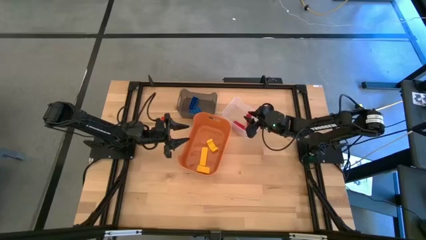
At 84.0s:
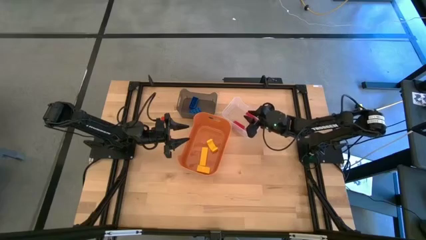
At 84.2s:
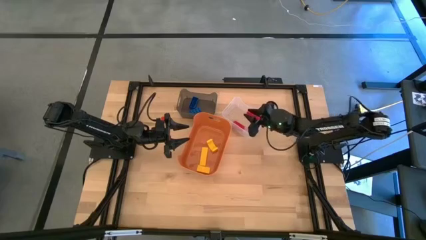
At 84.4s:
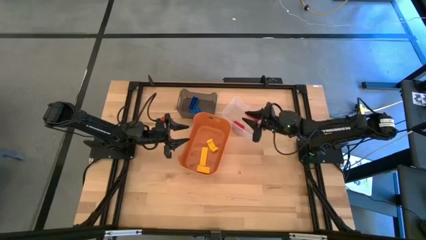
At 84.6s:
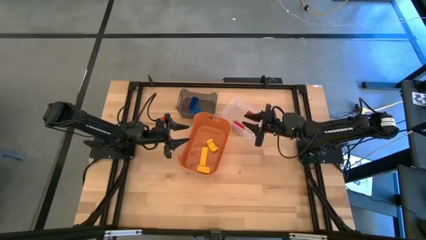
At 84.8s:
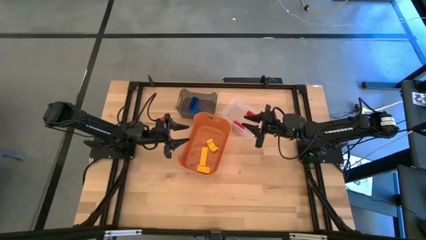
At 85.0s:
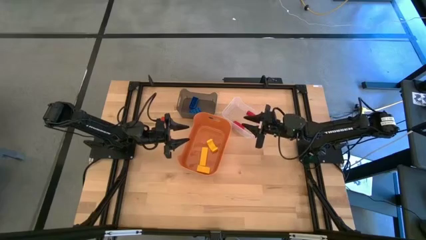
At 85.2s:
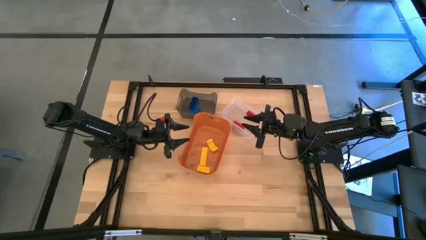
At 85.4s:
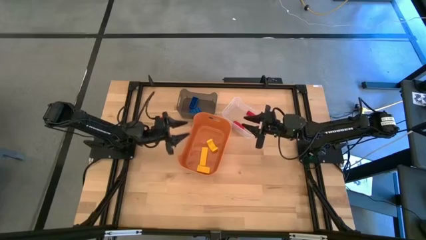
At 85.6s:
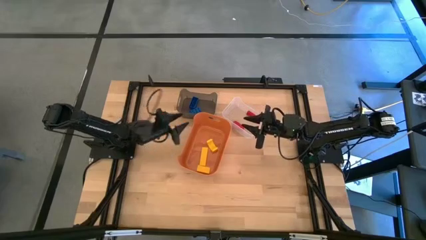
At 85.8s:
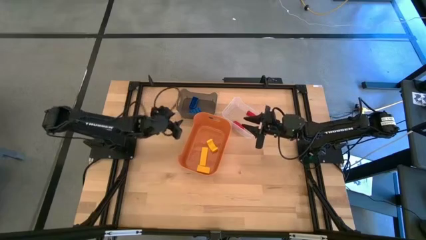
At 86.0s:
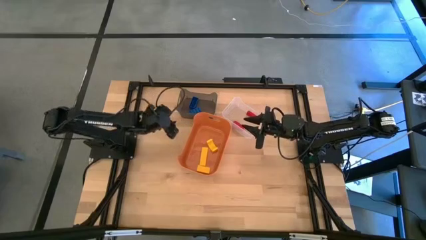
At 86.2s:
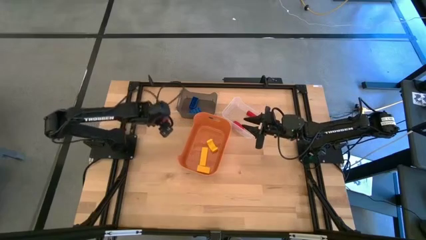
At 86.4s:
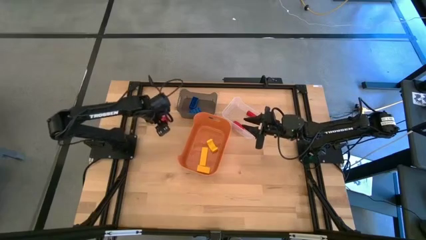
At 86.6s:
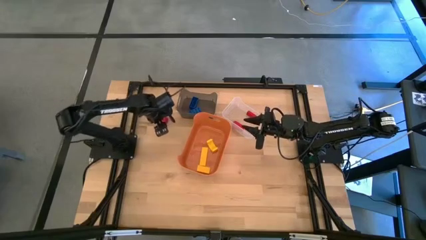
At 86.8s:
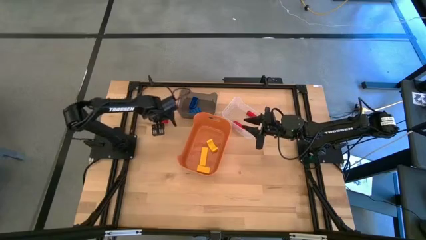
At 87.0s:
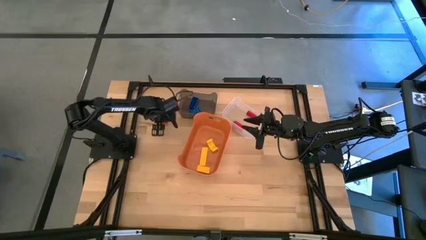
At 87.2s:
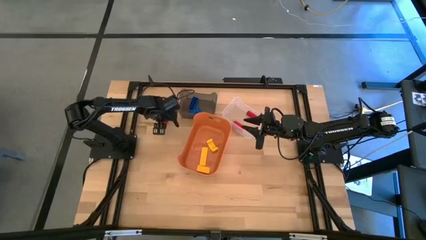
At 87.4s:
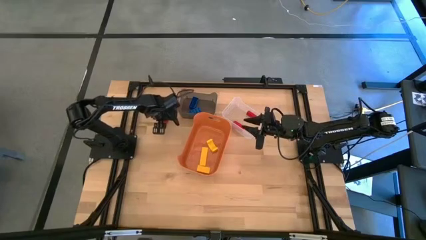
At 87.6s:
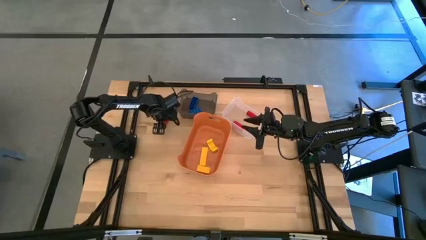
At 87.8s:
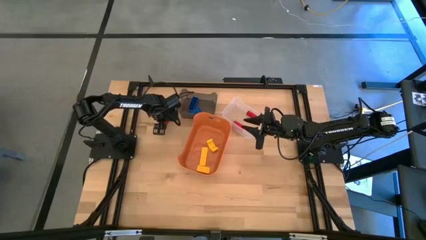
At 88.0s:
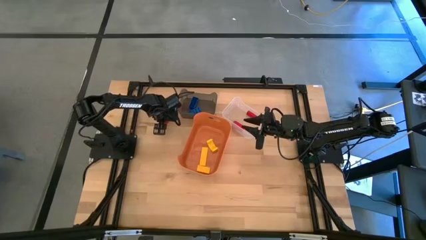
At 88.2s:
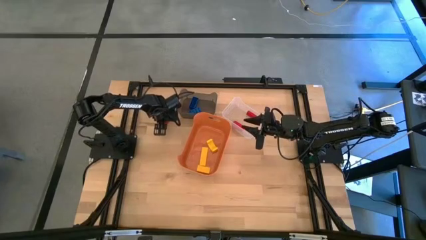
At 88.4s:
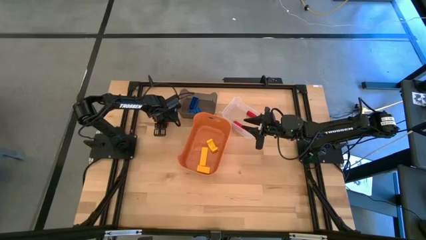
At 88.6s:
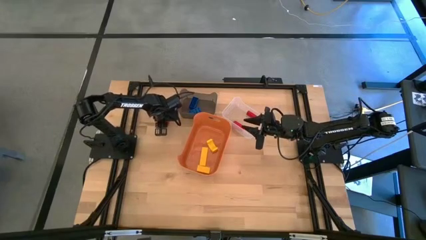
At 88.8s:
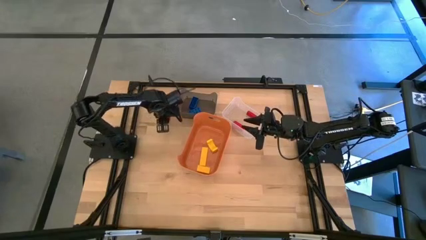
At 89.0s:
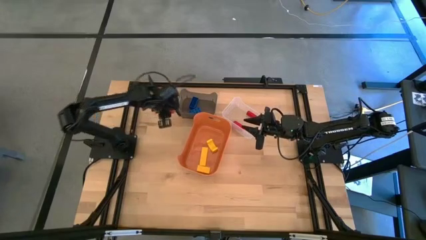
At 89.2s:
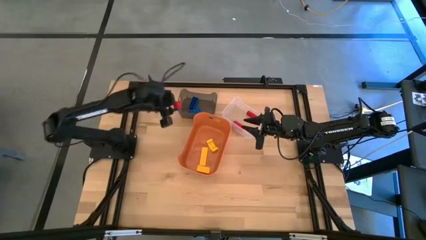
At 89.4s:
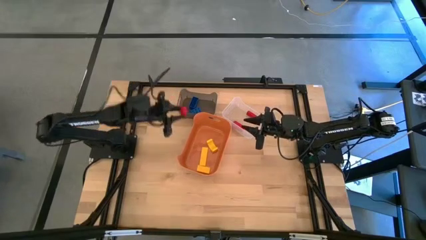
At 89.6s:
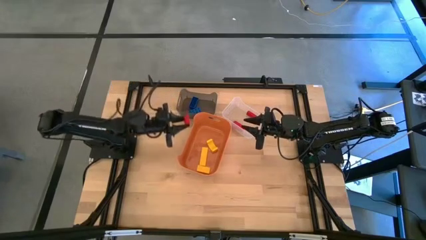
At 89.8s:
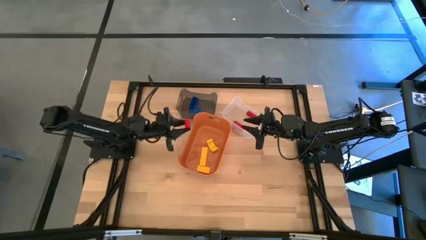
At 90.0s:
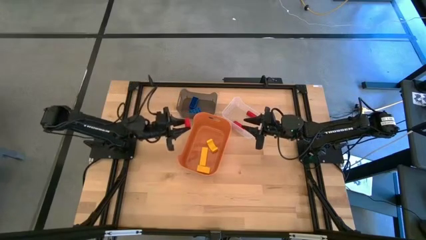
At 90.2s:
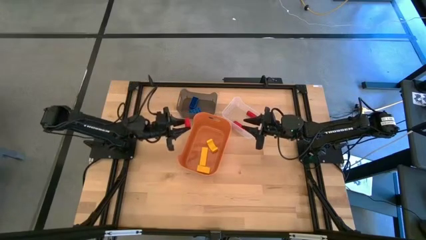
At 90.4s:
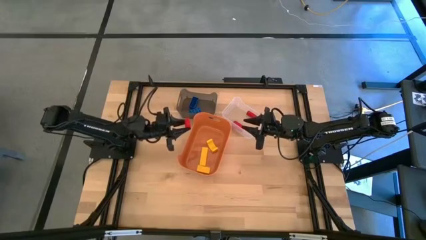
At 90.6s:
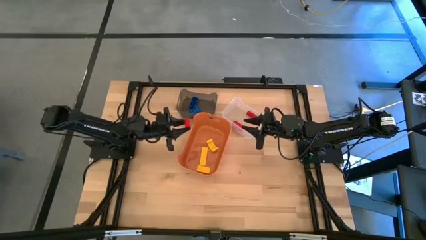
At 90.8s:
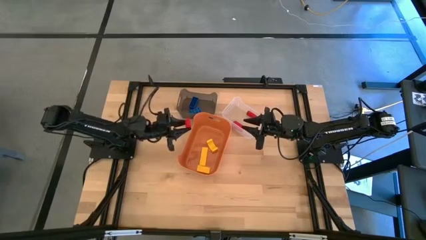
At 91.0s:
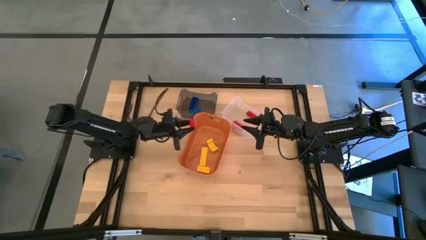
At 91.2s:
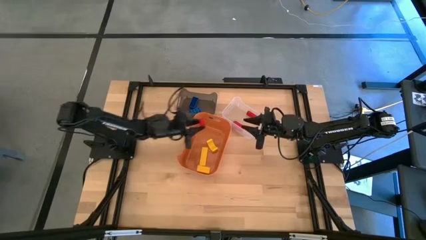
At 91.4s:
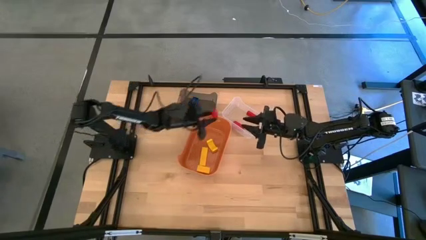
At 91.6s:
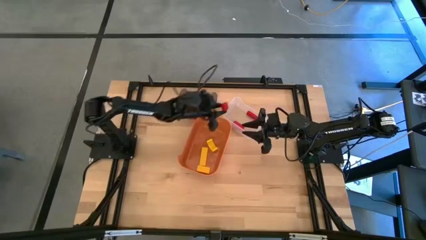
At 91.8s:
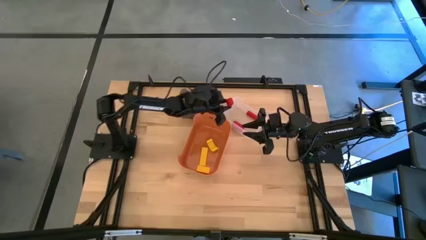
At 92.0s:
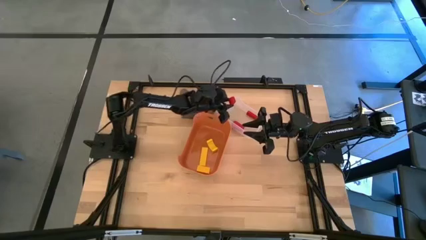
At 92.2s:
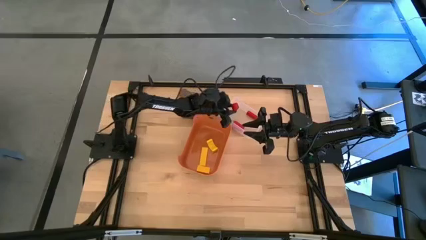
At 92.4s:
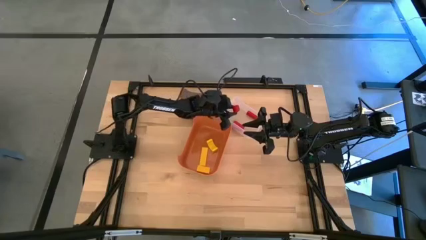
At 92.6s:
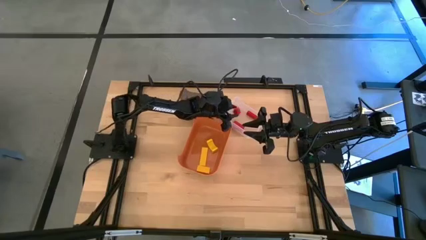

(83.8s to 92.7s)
Task: Sort & place blocks by color
Put the red block into the transparent bin

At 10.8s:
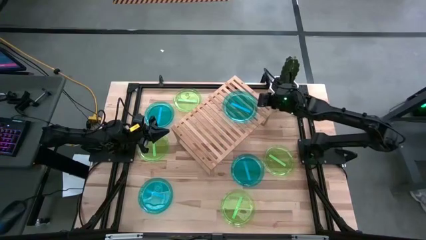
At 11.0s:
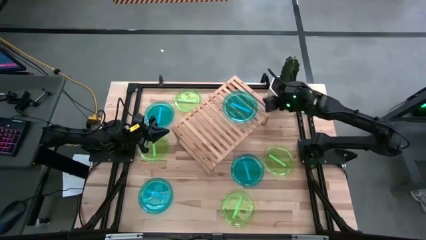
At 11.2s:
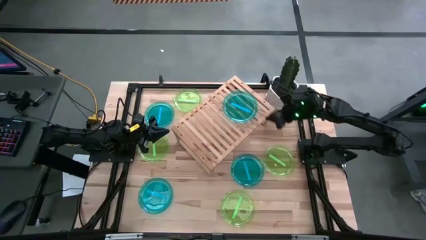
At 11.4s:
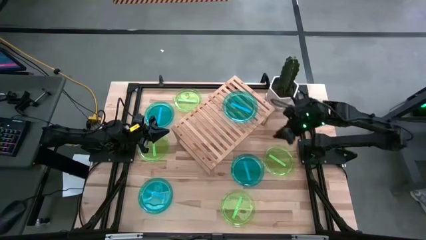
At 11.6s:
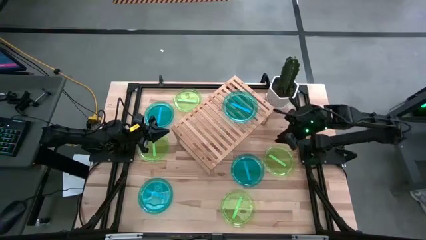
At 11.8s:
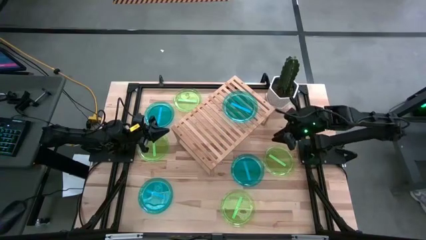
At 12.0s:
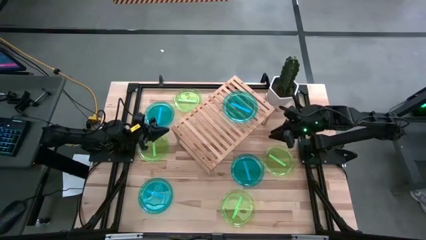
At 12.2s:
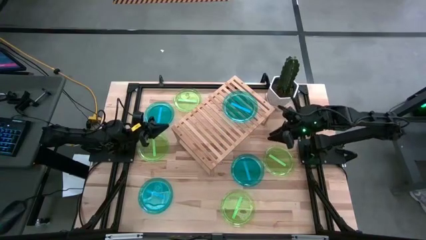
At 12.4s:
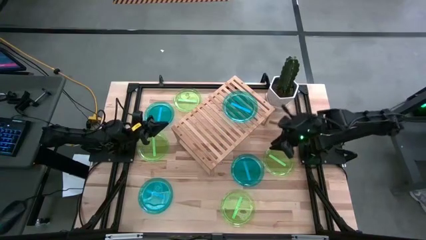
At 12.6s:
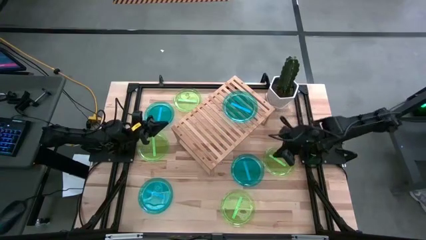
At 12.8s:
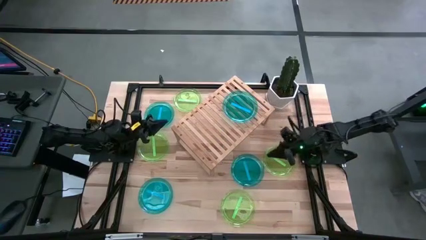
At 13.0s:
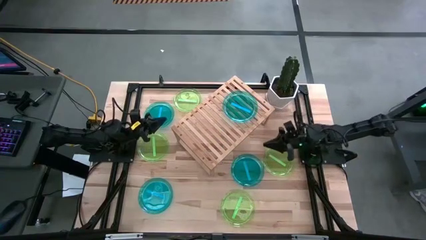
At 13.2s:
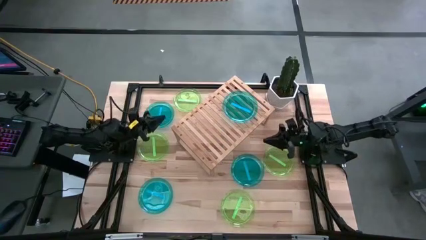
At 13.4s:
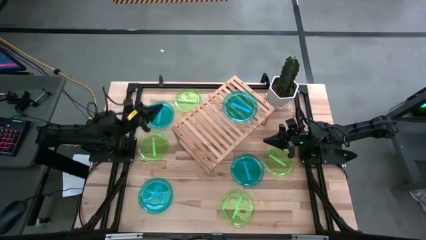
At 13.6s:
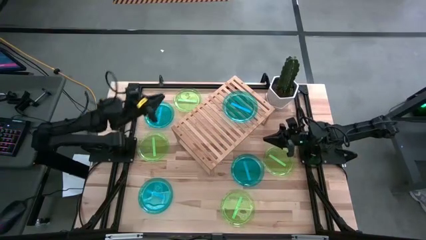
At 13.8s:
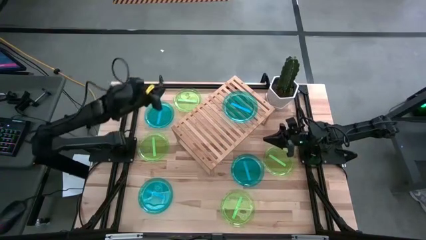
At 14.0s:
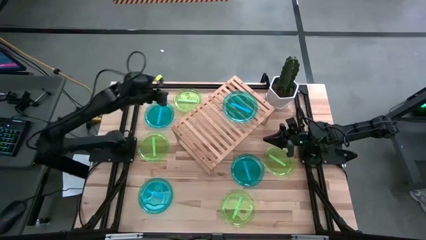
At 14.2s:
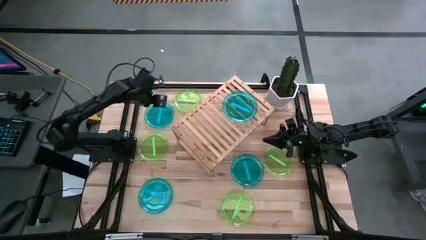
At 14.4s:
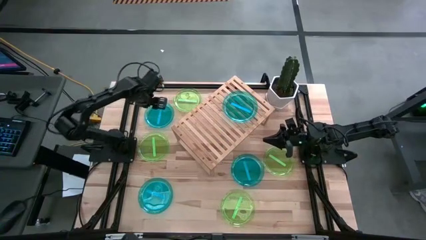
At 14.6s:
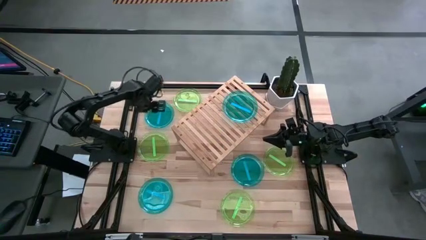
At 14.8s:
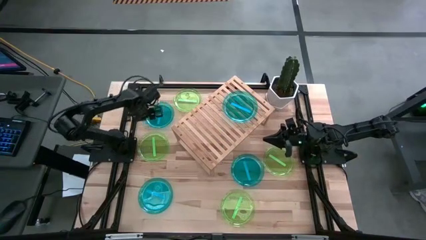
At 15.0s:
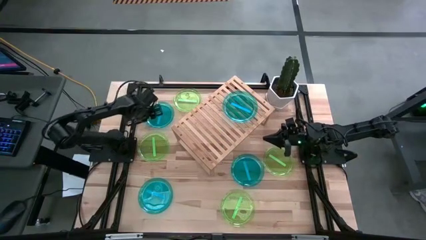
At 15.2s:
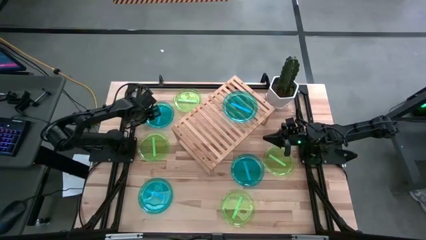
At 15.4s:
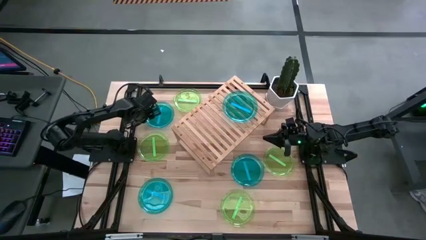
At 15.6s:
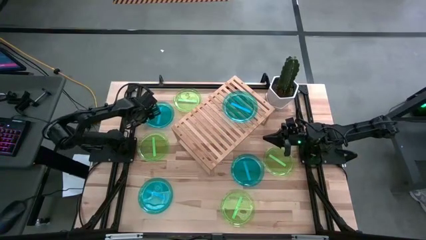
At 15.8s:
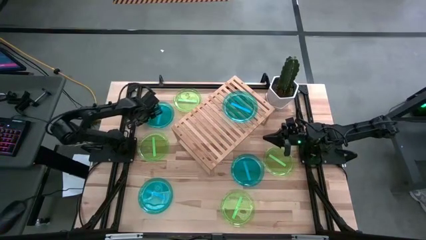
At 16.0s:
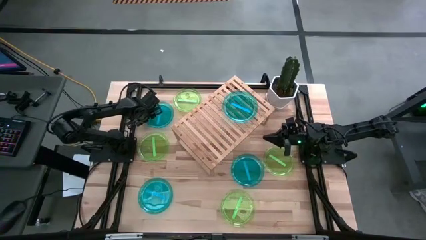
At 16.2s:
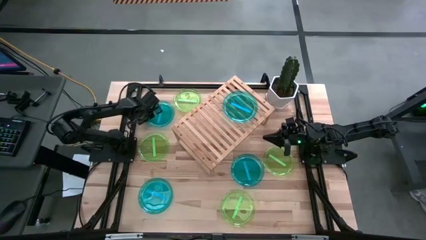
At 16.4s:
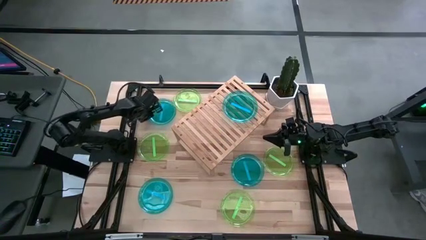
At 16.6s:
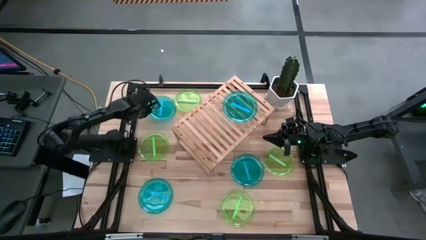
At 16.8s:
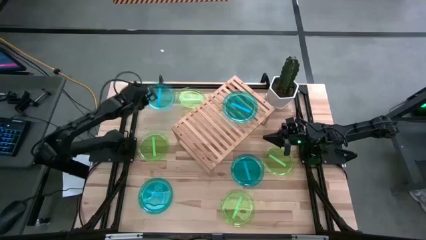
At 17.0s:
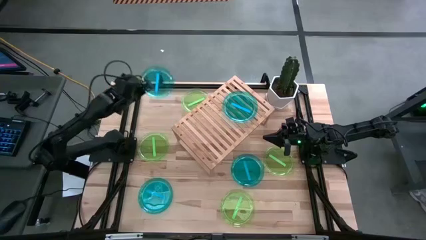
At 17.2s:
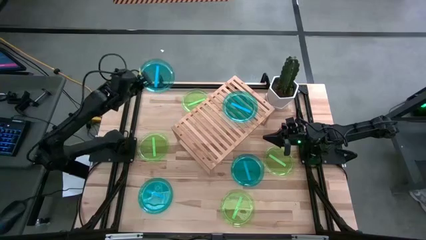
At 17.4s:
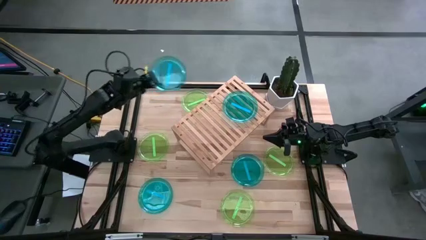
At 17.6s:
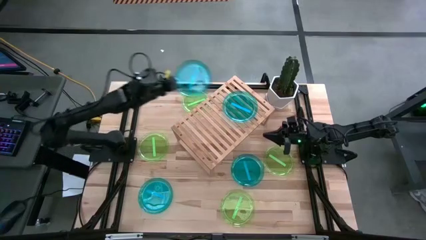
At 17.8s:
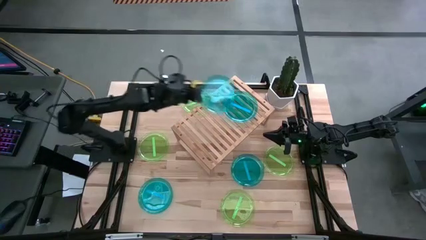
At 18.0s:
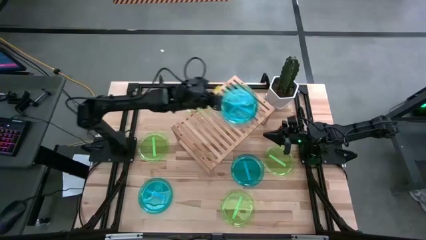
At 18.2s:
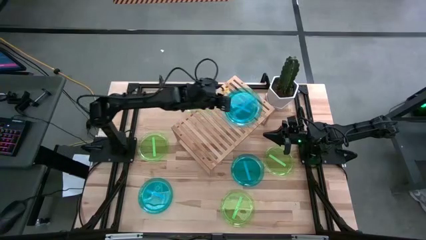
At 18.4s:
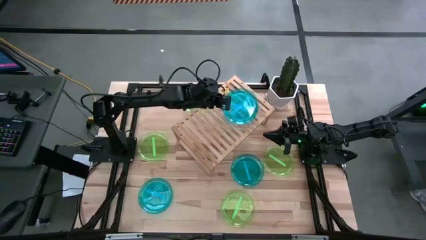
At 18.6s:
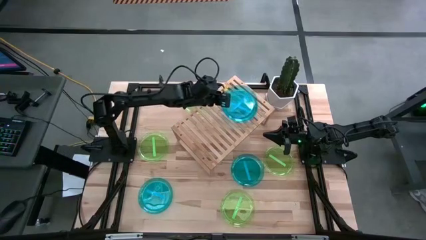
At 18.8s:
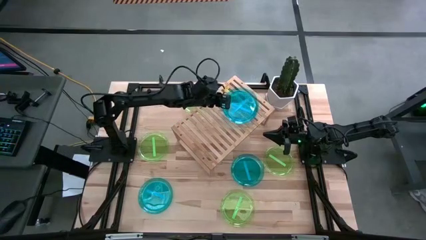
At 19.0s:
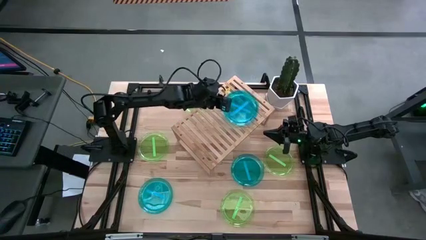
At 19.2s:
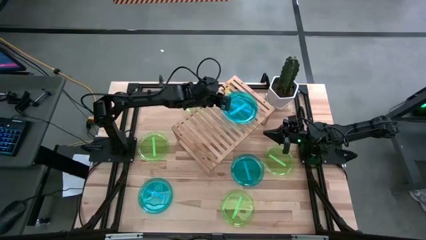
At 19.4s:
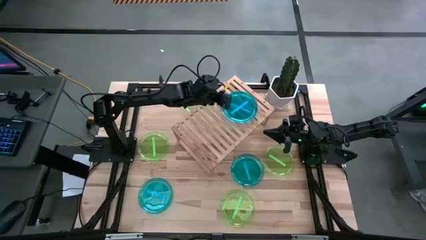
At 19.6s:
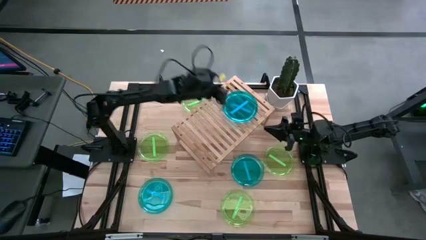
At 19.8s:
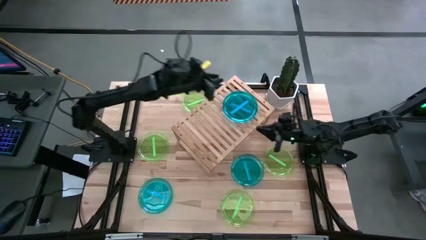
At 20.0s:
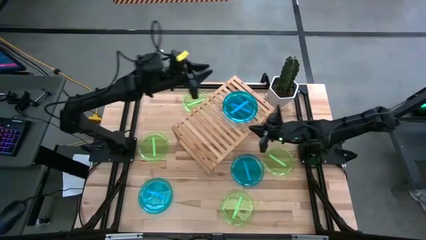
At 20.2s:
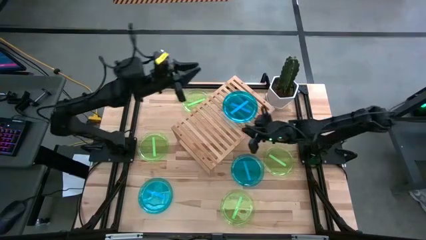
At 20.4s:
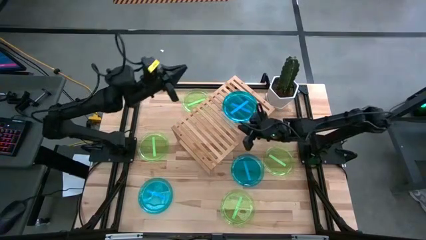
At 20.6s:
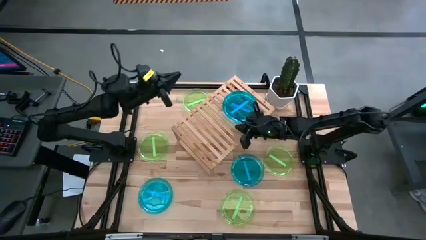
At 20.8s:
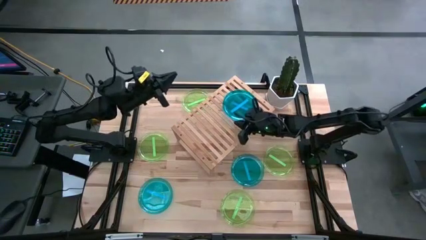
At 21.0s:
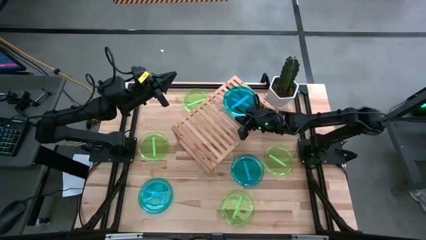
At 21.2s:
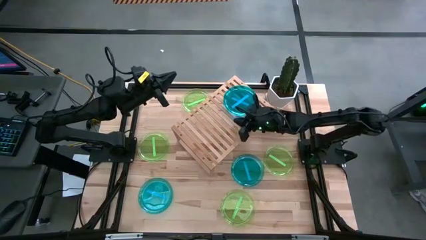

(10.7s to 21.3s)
Task: Place and stack plates onto a shelf
Stack the top blue plate on top of the blue plate on the shelf
